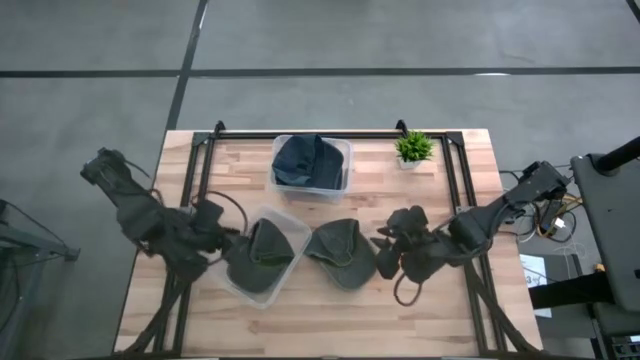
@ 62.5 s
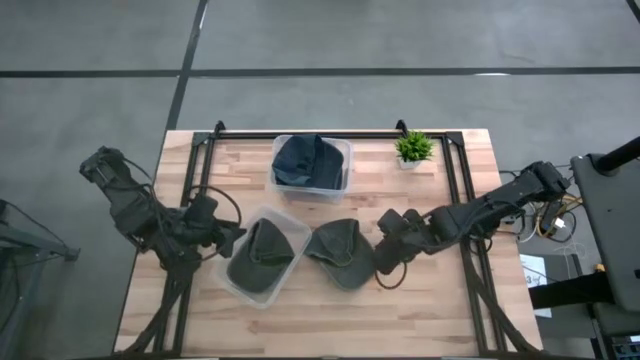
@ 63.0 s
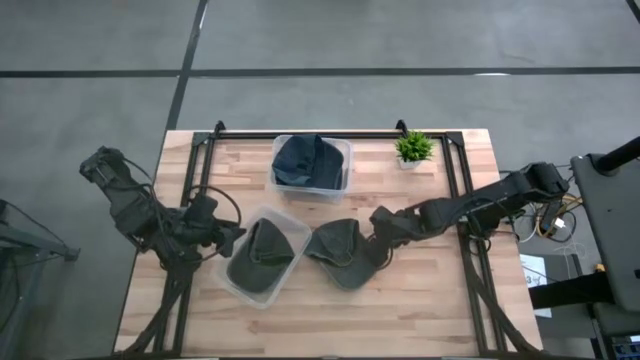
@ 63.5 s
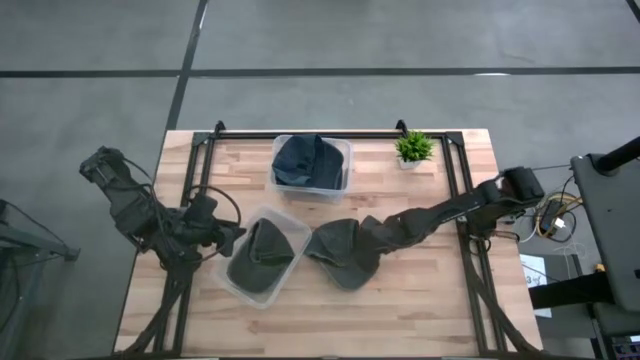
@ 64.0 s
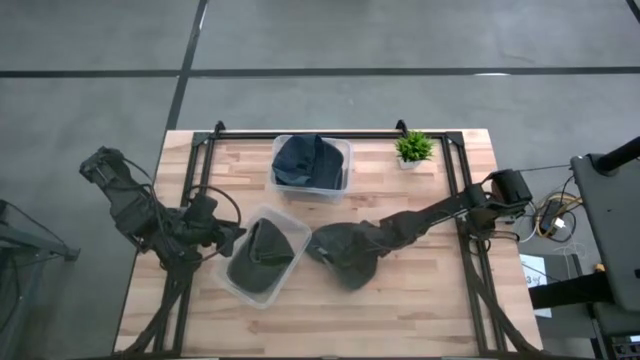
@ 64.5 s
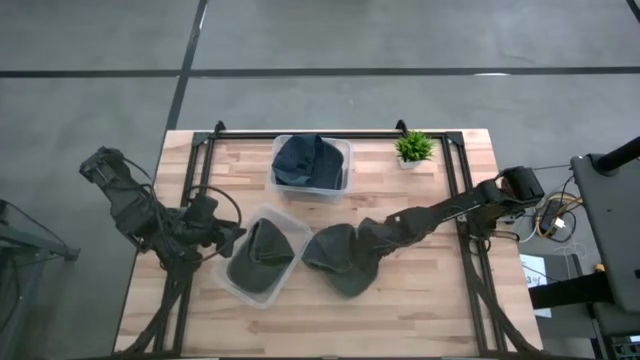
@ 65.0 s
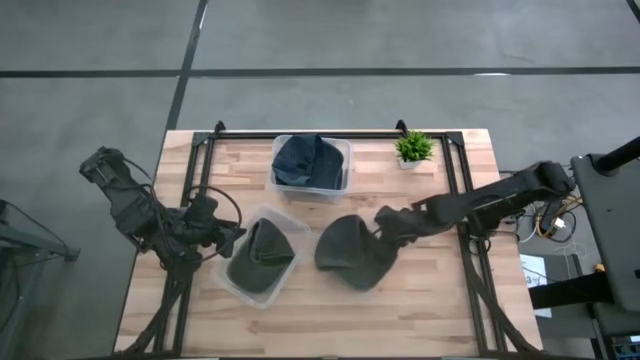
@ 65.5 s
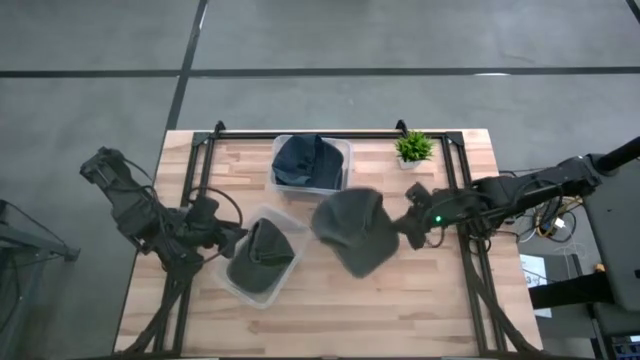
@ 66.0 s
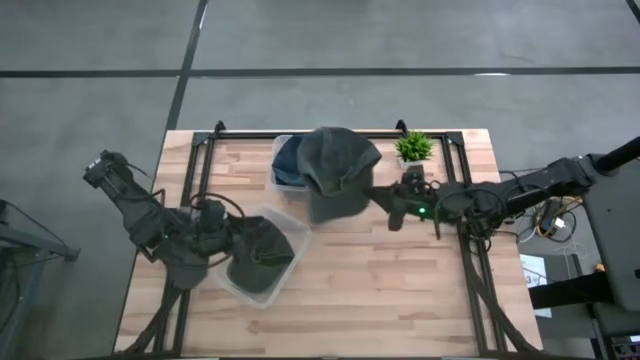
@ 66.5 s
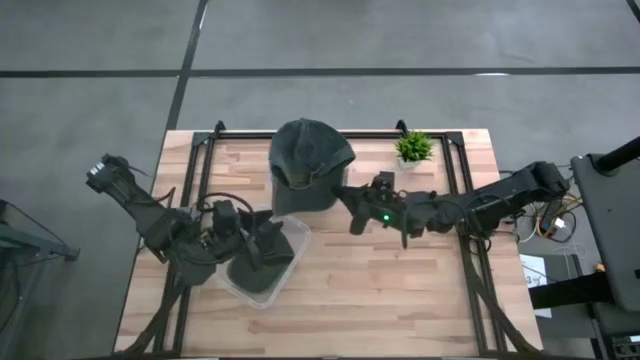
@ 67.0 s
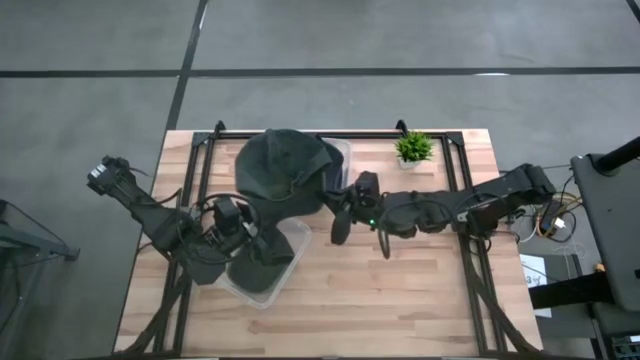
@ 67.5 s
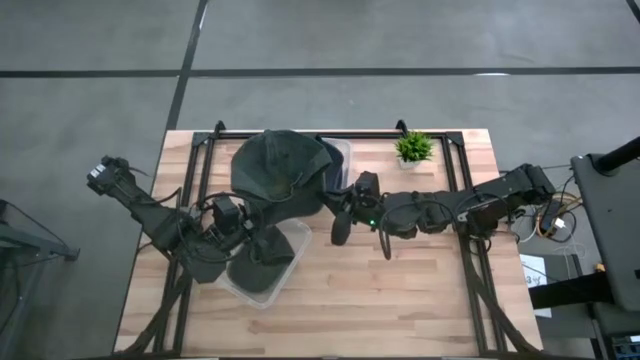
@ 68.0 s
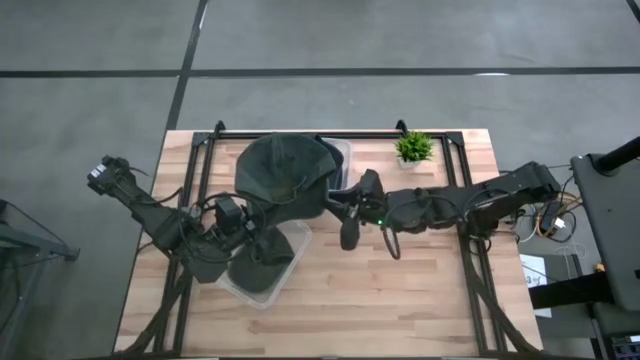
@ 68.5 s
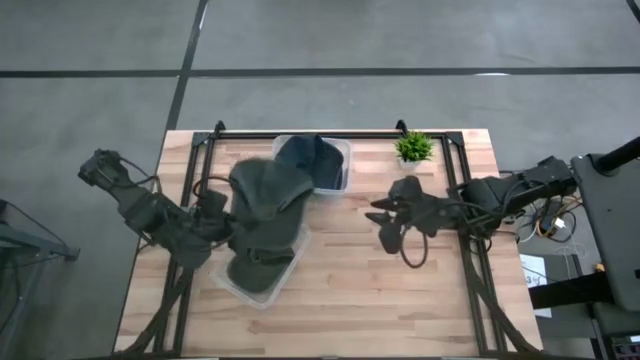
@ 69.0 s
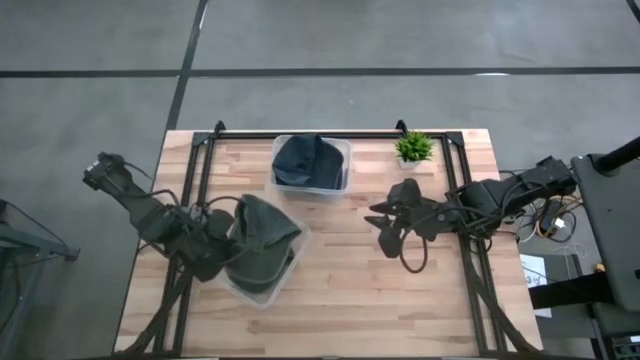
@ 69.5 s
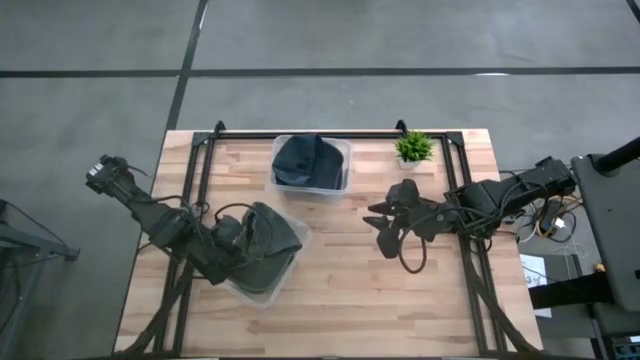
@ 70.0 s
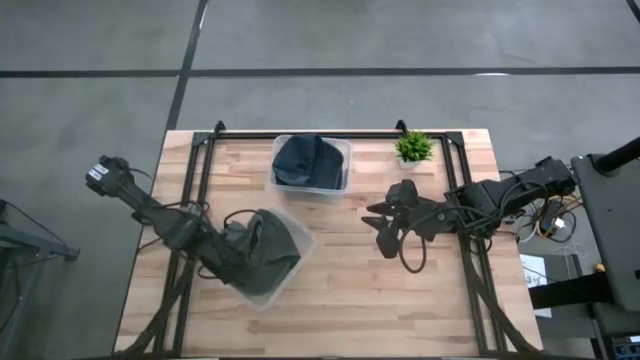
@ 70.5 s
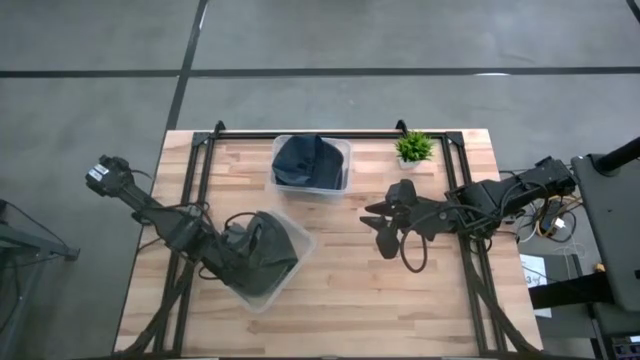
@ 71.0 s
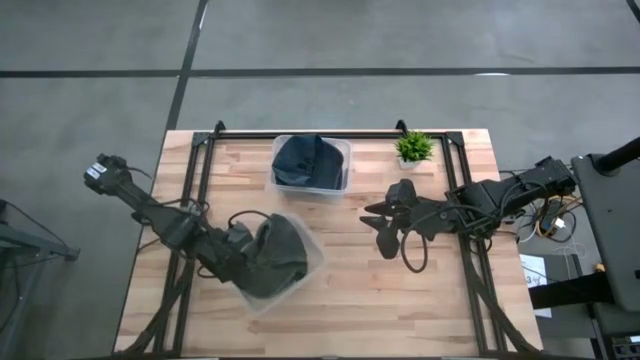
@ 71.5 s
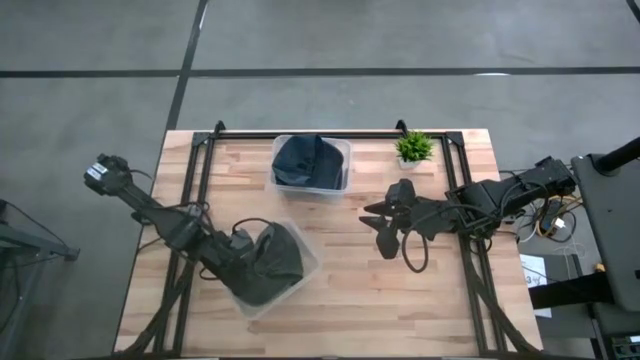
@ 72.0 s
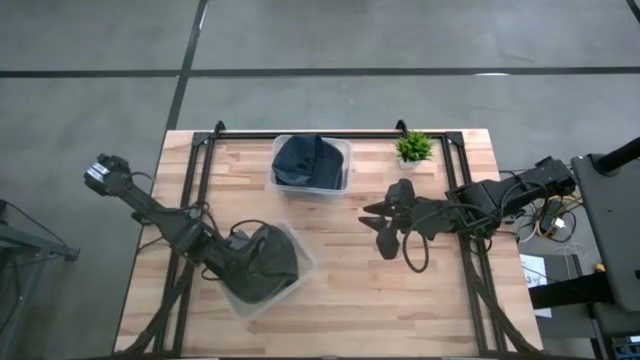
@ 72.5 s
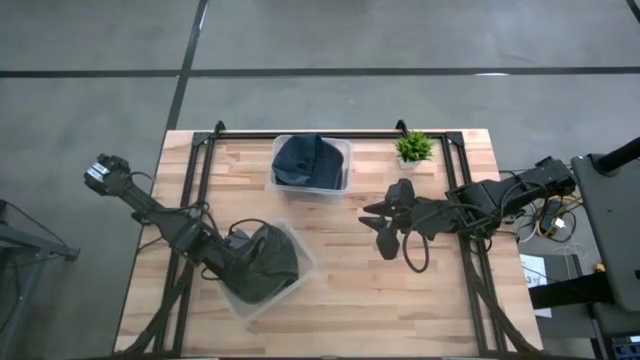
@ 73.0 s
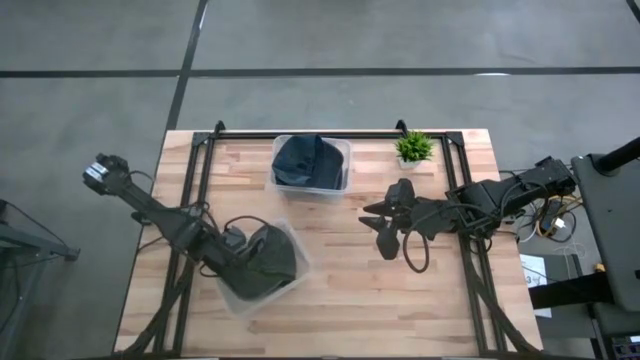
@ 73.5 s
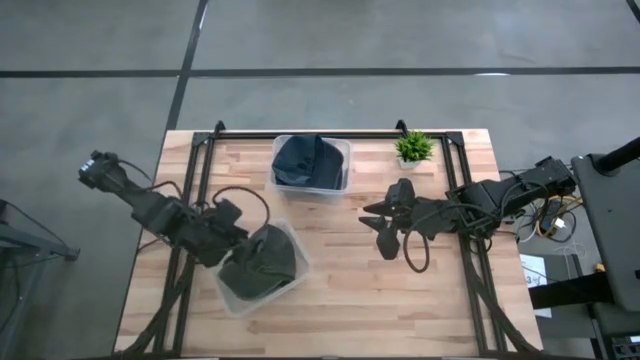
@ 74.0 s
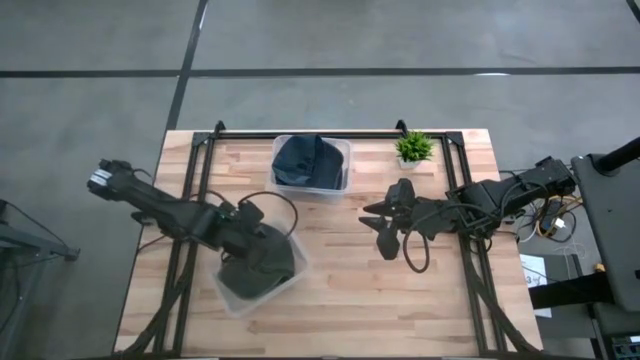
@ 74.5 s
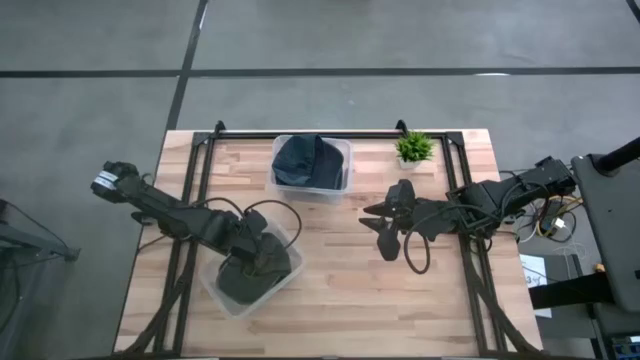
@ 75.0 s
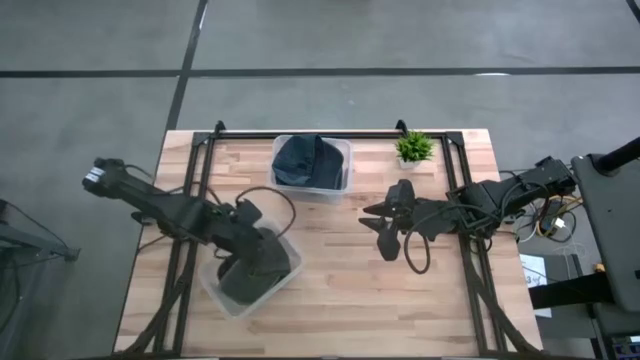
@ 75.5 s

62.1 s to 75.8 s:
Task: Pick & Place hat
Put the black cap into the bottom transparent bin

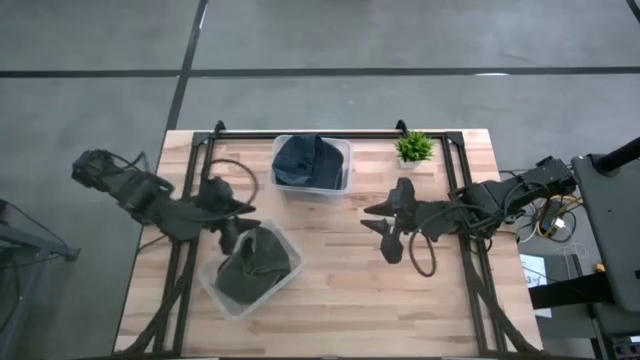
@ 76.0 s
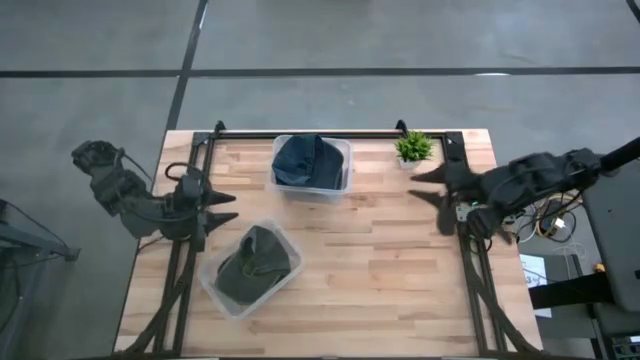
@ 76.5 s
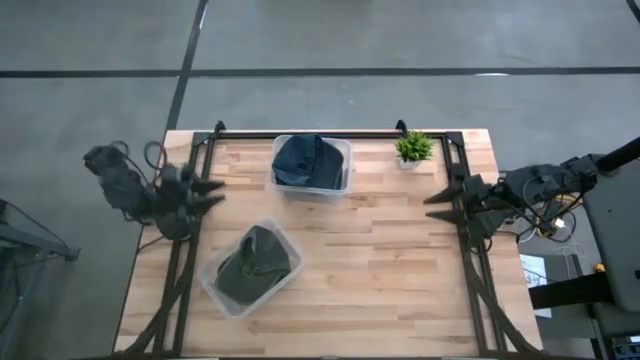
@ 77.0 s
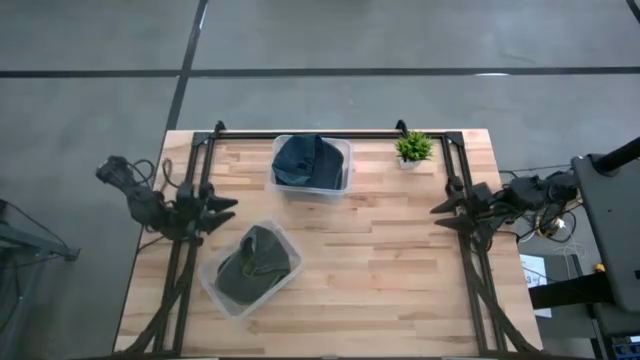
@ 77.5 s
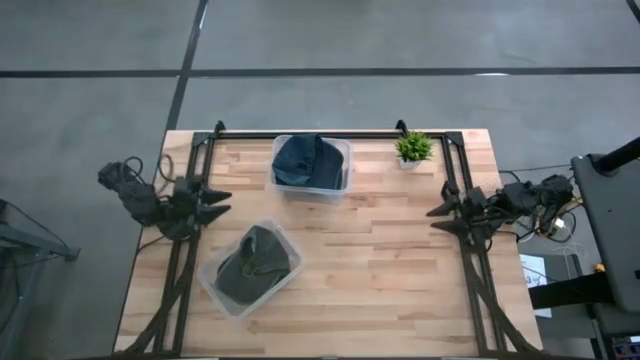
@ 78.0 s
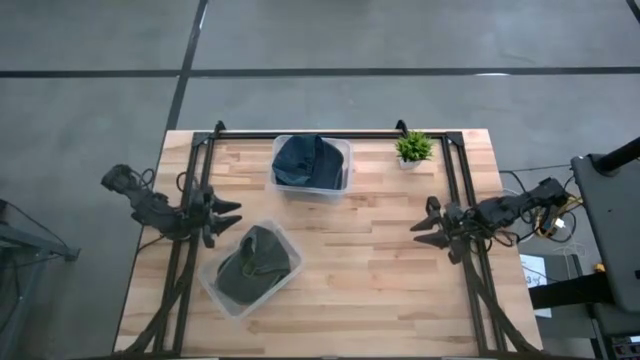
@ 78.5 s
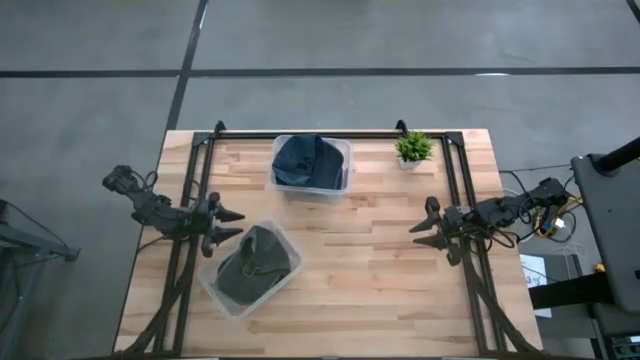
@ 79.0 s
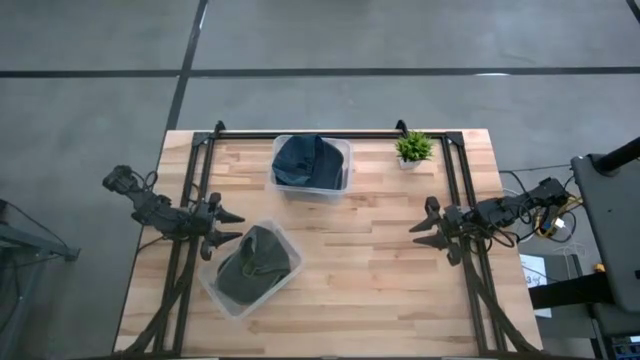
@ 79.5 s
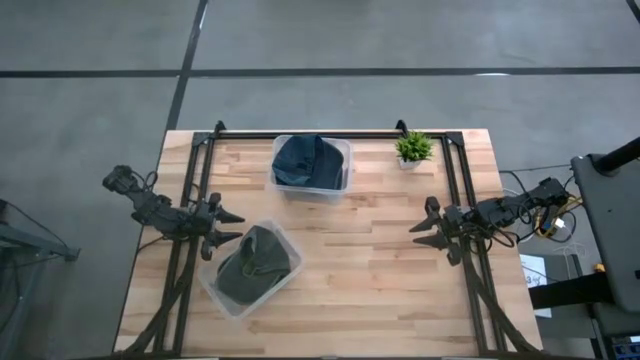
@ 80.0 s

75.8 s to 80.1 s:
Return to Home Position

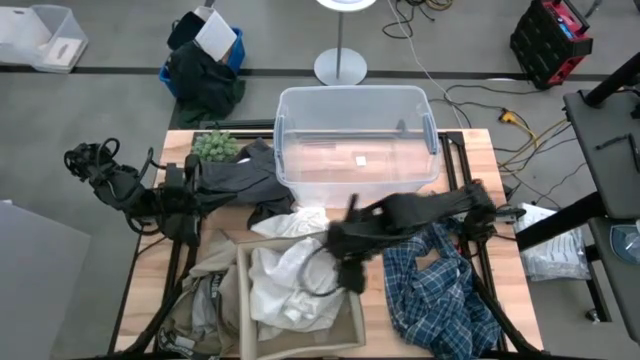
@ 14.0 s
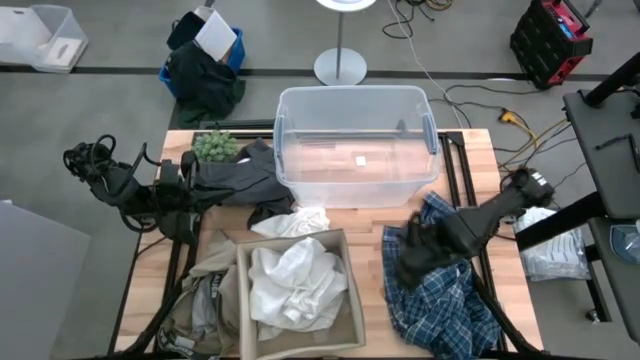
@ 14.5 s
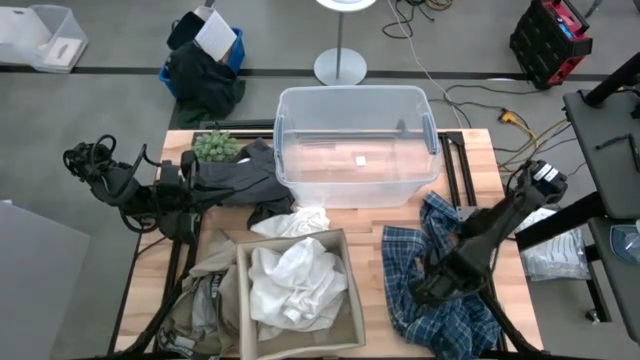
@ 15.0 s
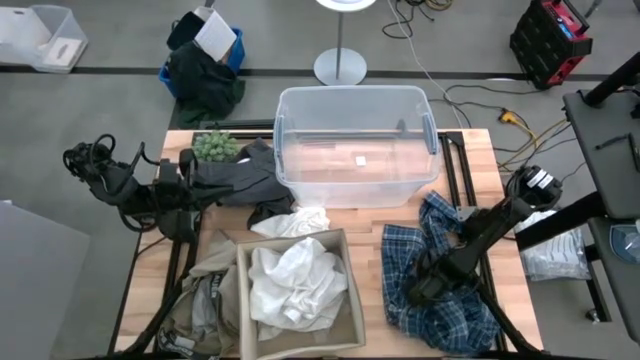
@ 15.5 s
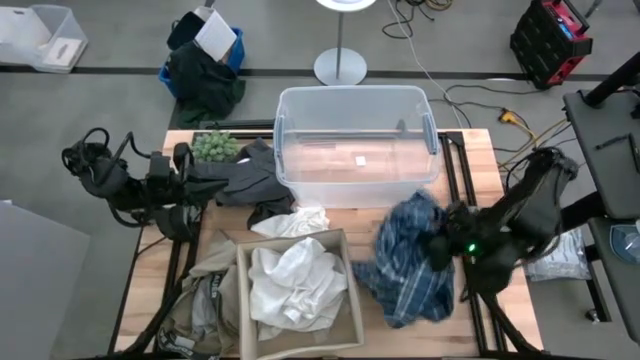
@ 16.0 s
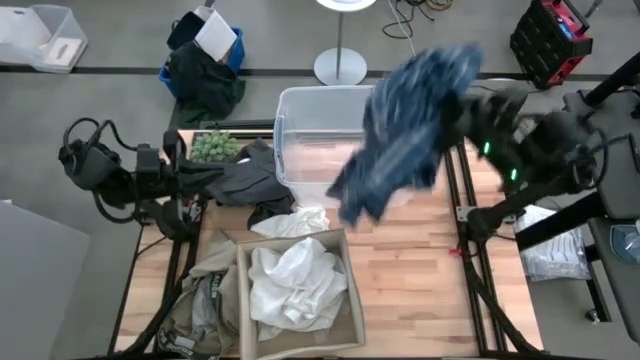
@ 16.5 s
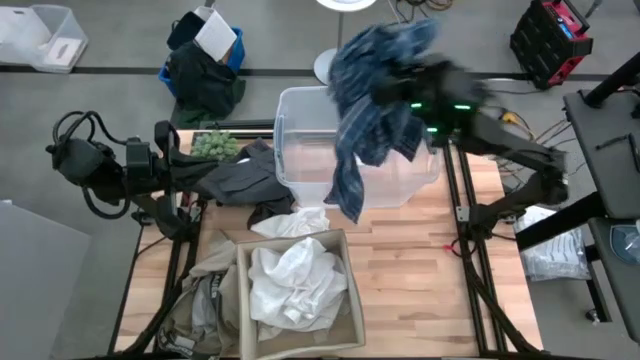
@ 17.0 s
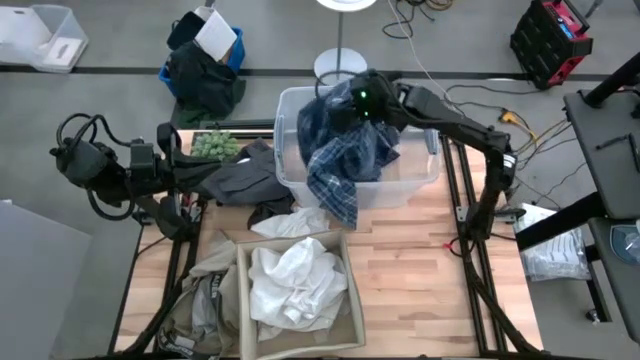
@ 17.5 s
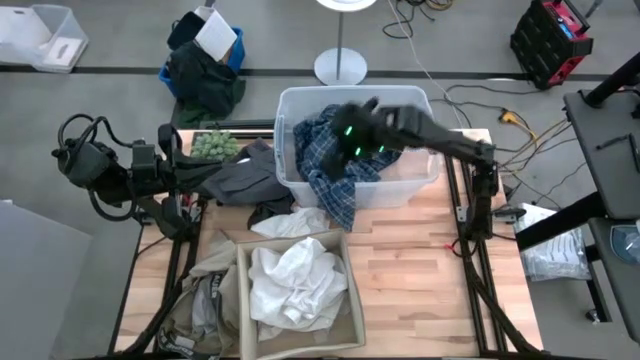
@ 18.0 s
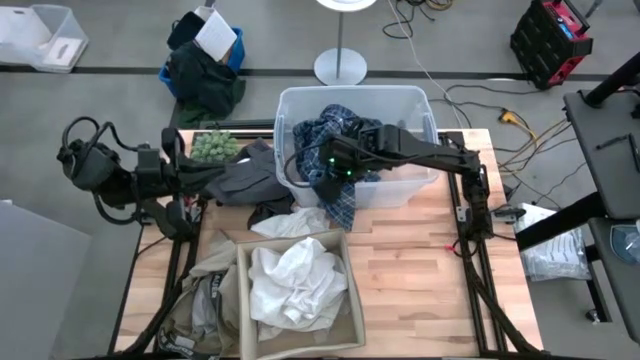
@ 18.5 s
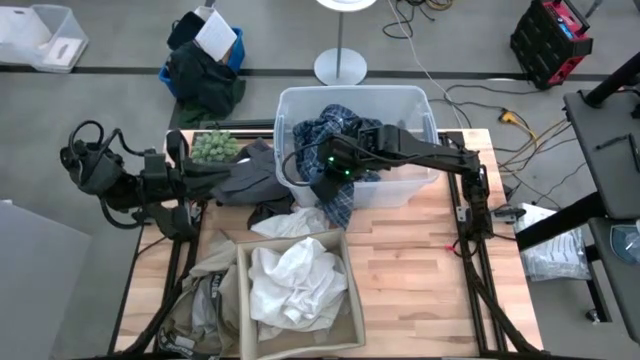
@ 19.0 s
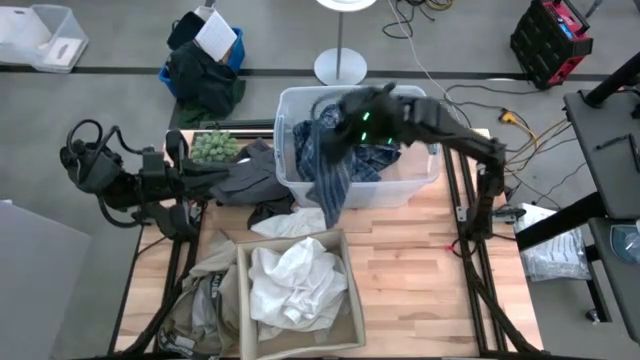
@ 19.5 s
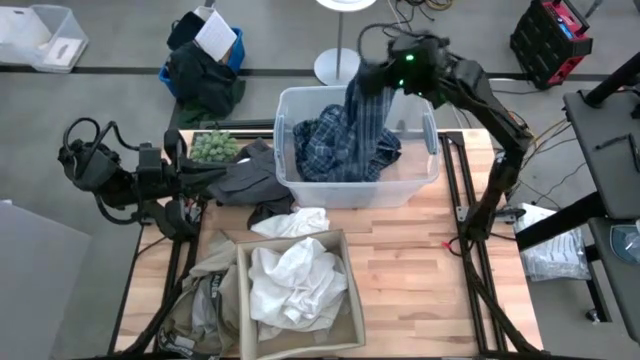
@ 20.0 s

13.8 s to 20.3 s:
Task: Sort clothes
Put the blue checkered shirt into the transparent bin
